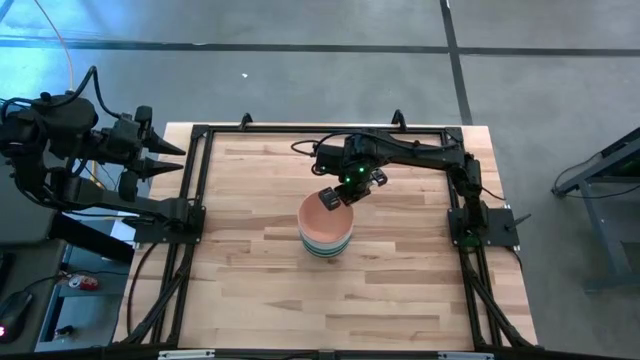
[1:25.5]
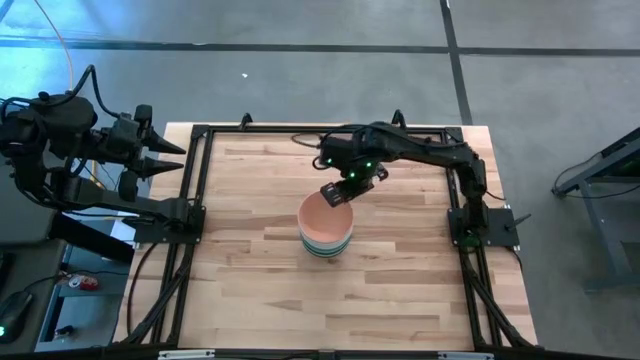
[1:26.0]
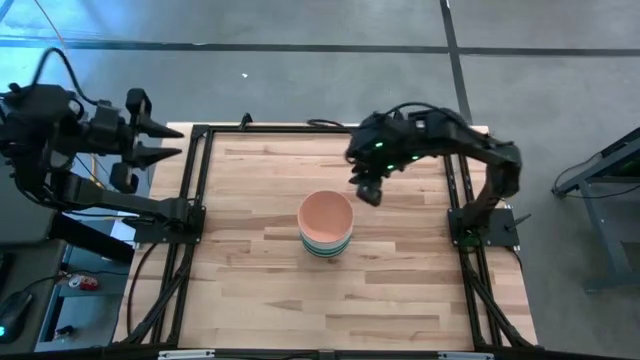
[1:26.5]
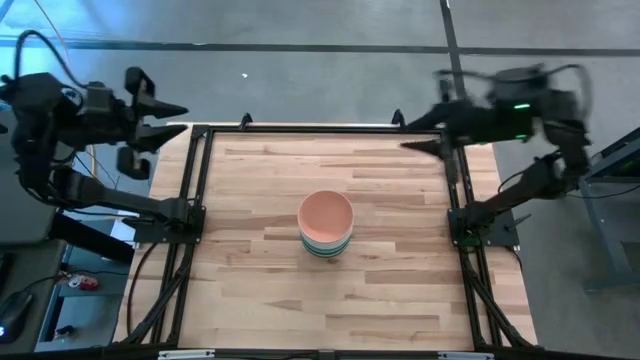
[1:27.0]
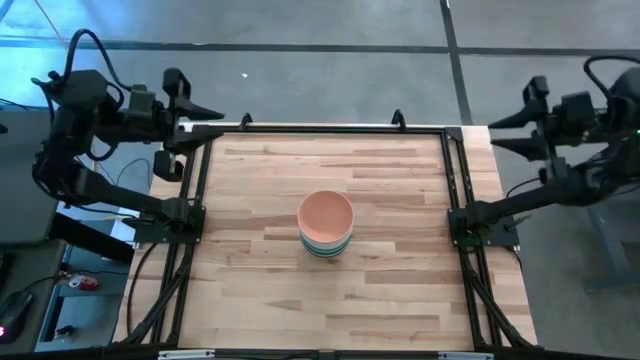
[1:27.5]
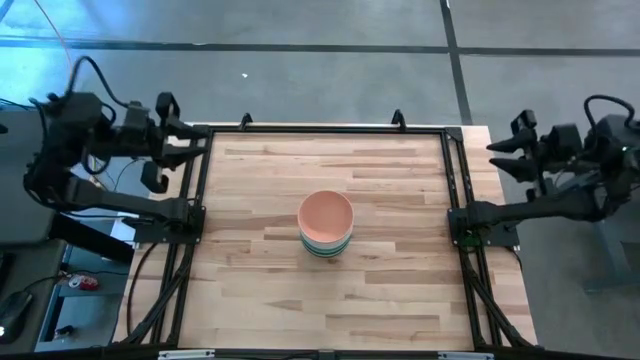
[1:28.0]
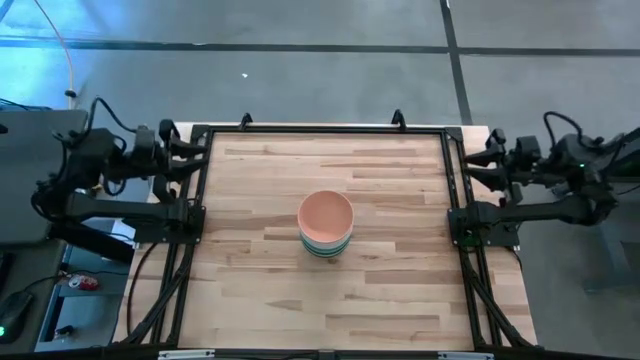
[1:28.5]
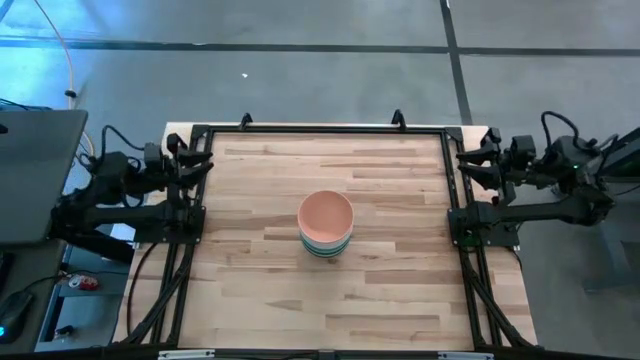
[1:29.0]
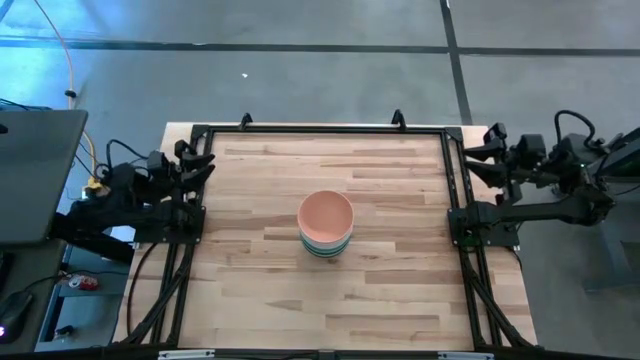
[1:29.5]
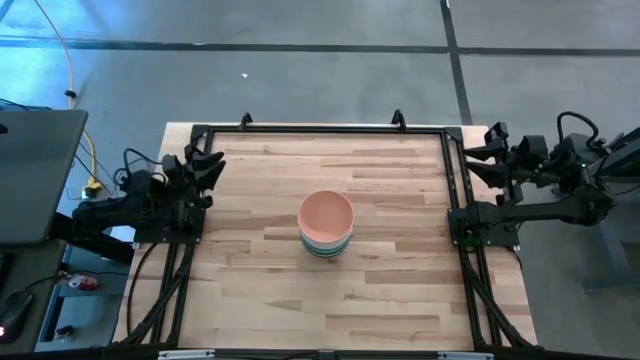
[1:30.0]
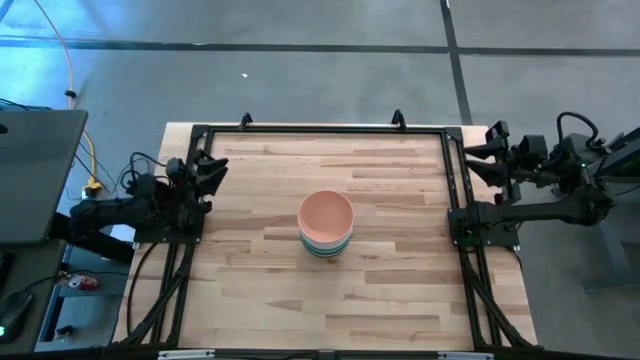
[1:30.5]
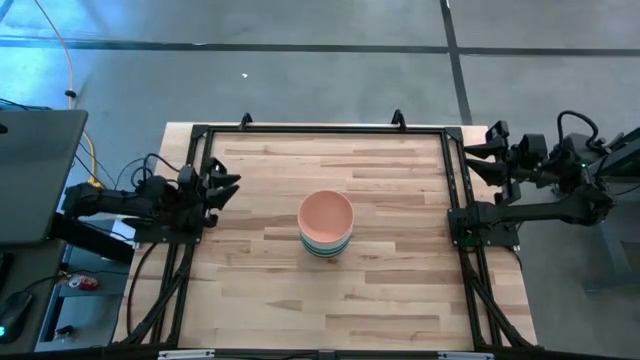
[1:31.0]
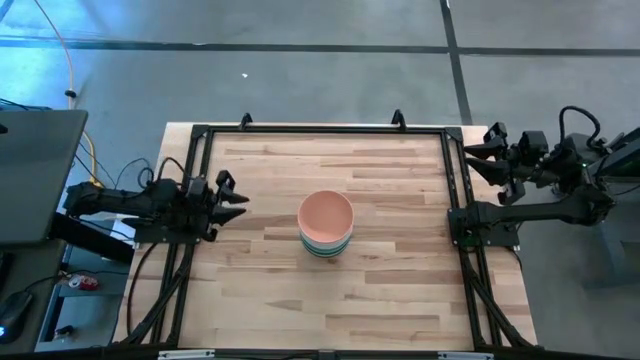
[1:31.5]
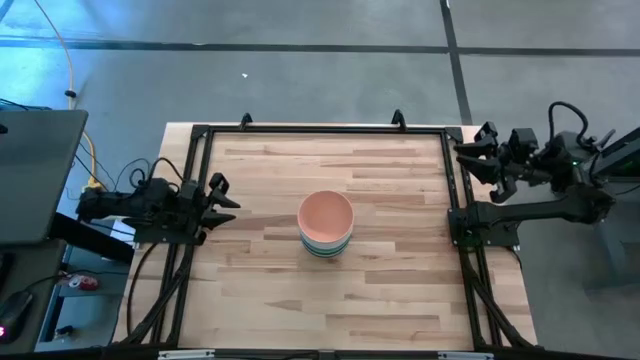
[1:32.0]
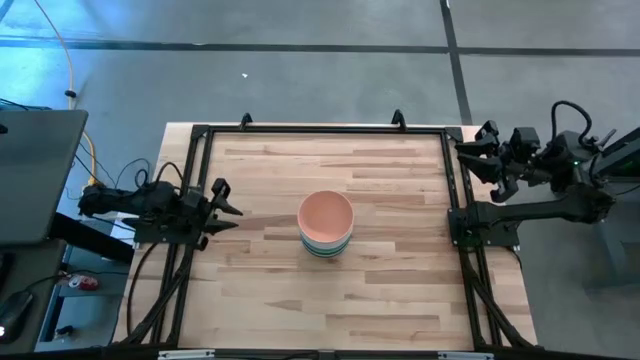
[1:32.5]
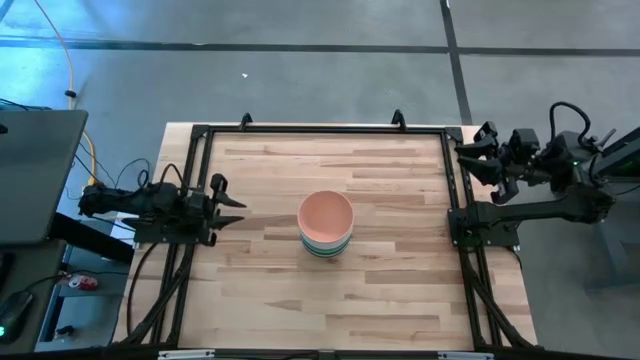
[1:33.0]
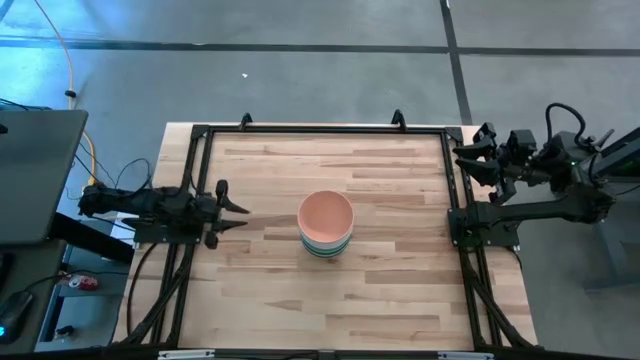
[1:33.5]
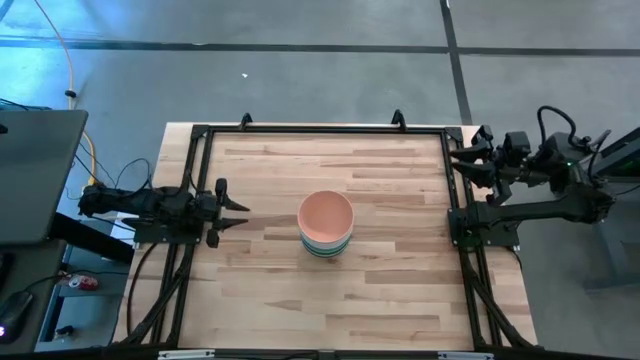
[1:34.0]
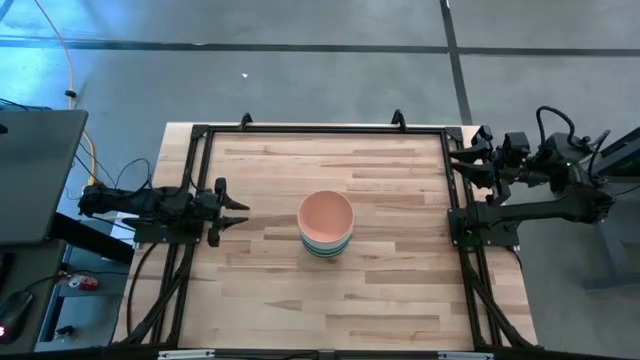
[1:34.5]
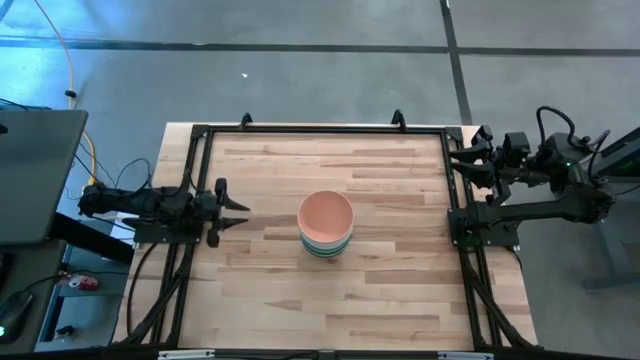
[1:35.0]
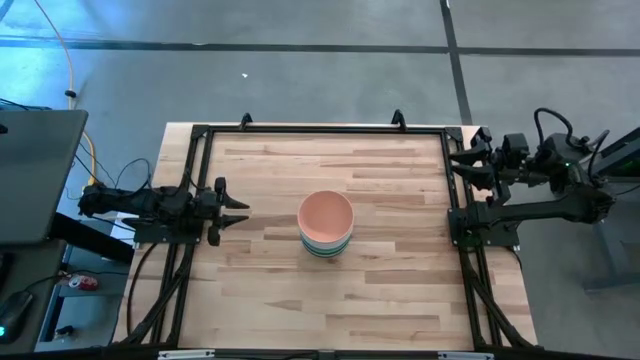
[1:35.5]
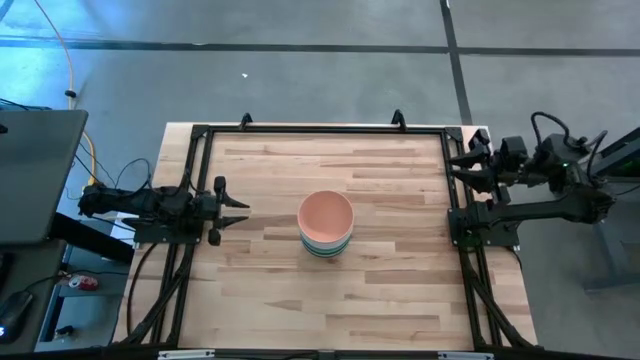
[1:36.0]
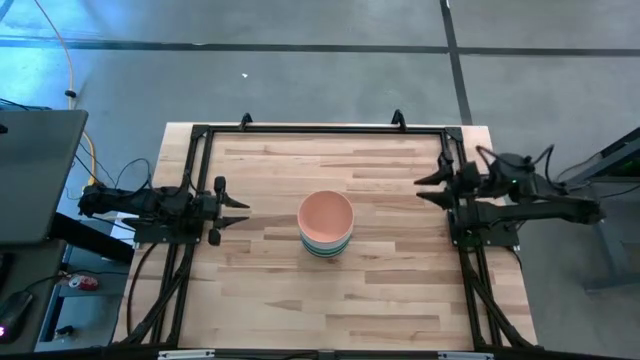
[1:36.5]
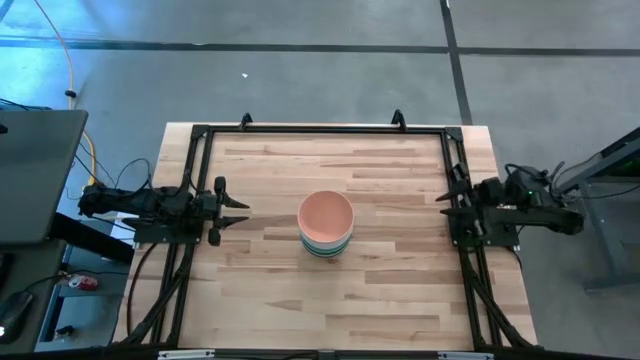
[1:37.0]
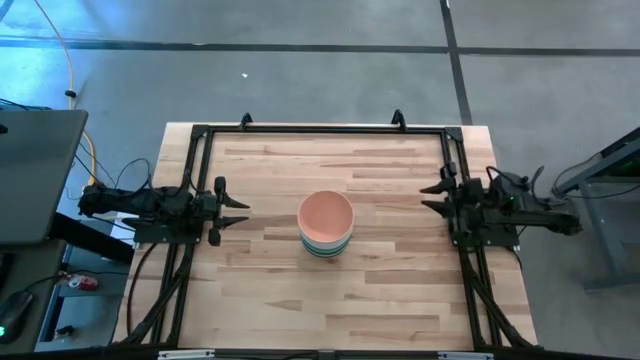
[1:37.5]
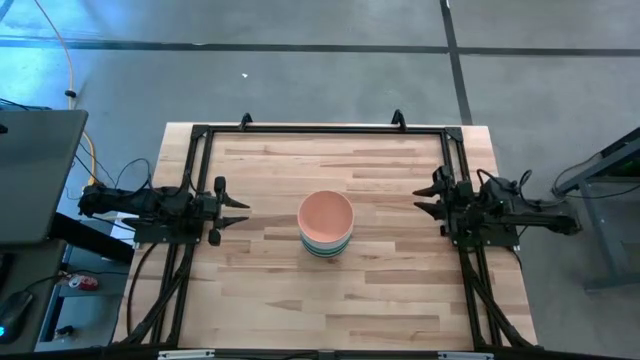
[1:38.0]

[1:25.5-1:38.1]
Task: Nest bowls inside each other
Return to Home Position

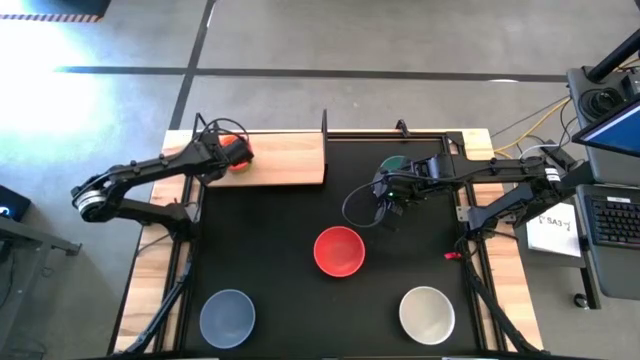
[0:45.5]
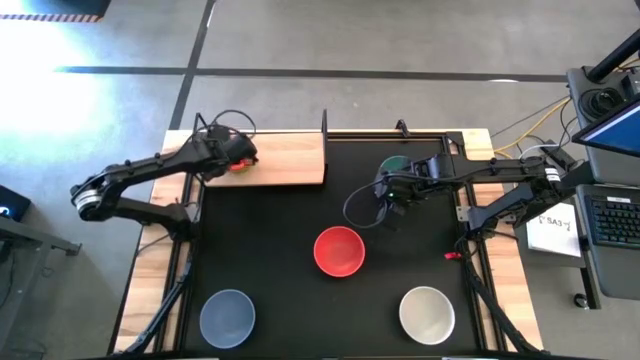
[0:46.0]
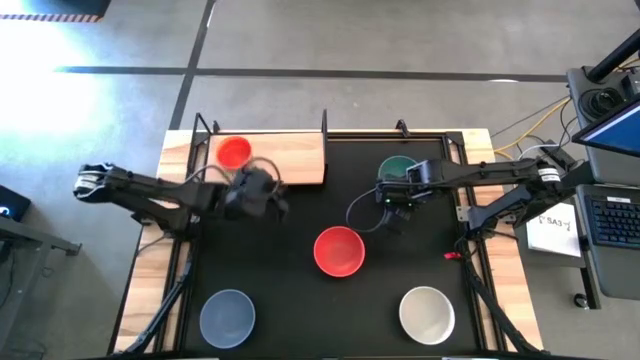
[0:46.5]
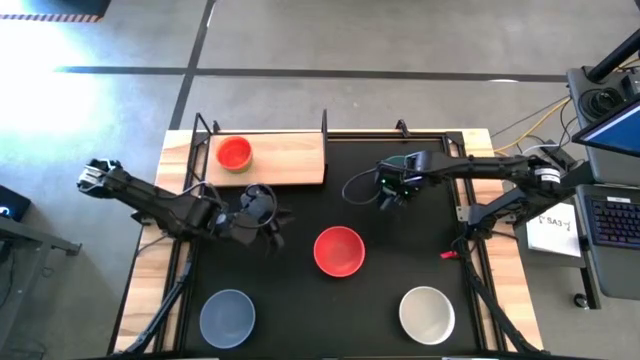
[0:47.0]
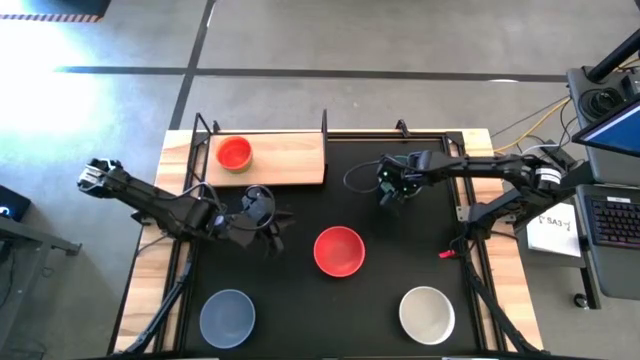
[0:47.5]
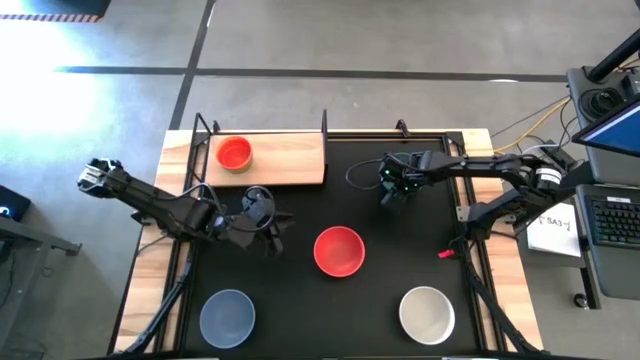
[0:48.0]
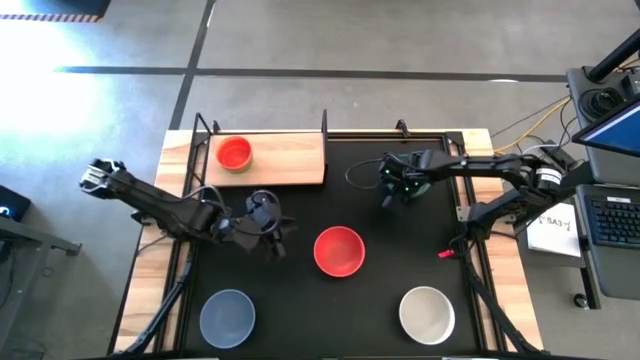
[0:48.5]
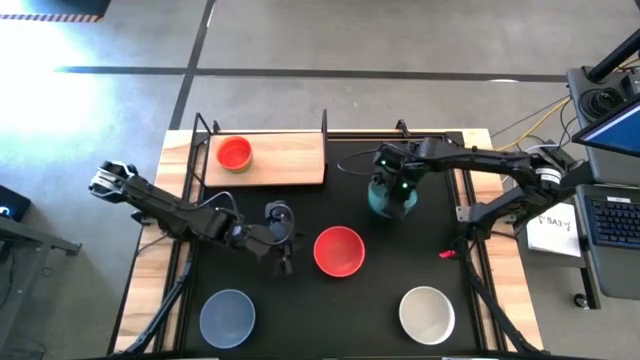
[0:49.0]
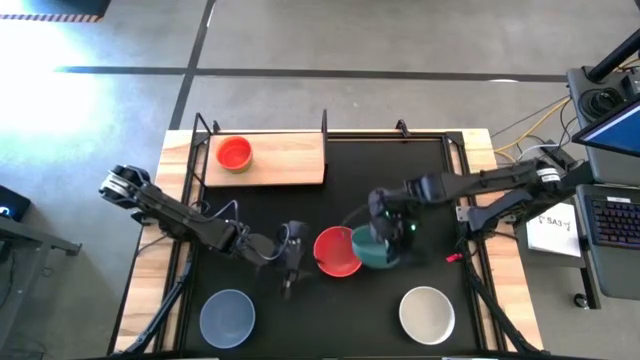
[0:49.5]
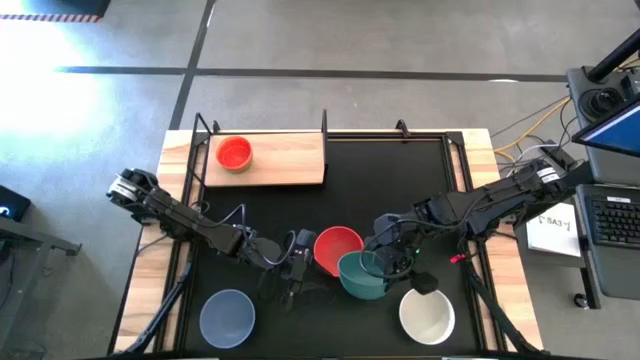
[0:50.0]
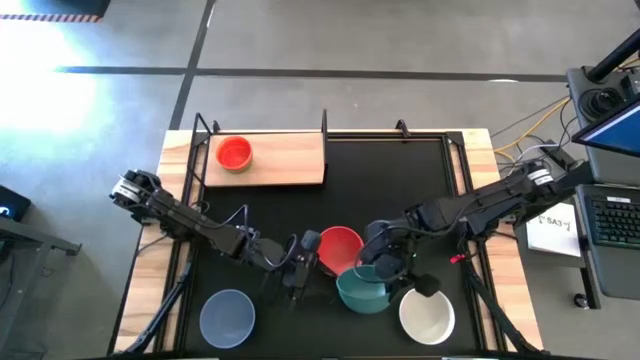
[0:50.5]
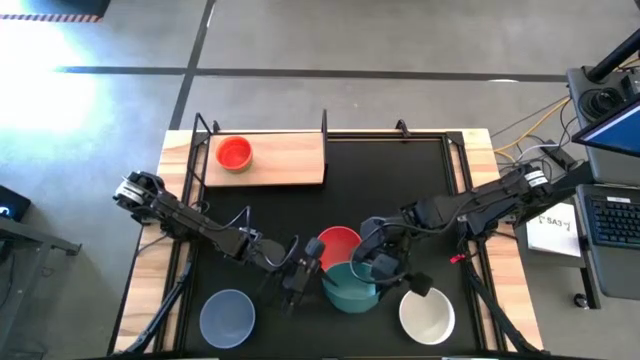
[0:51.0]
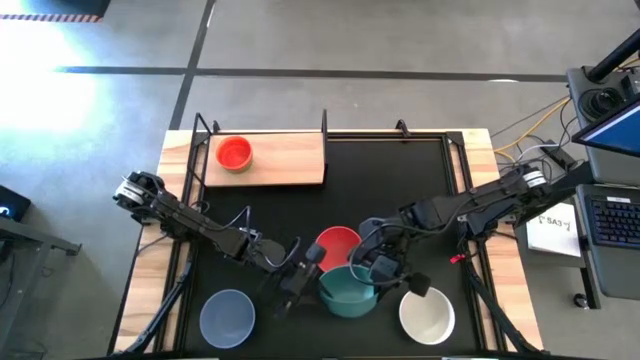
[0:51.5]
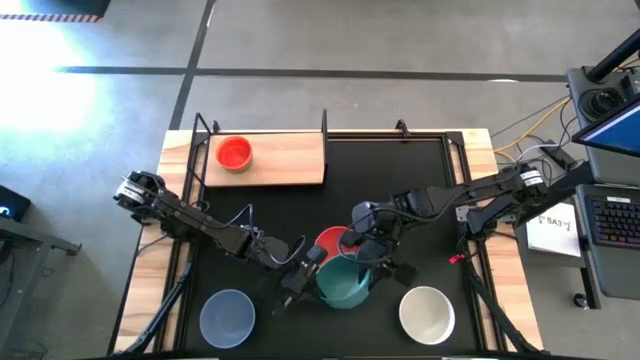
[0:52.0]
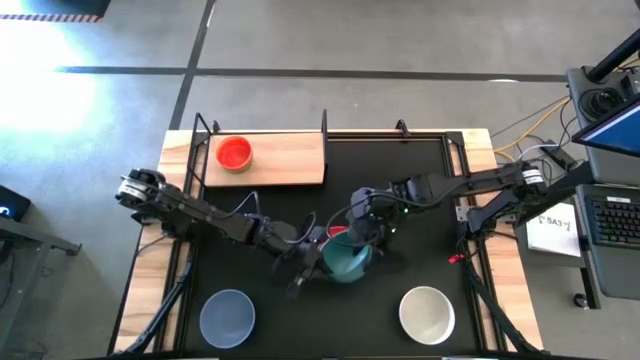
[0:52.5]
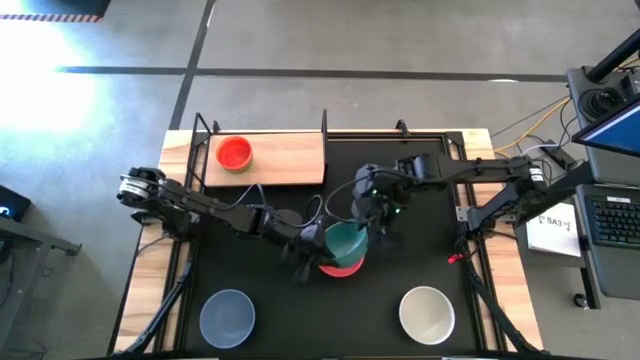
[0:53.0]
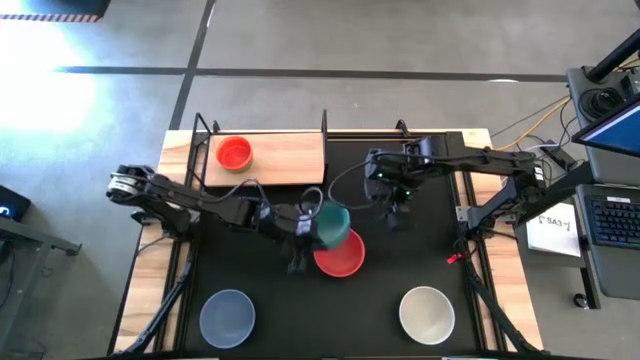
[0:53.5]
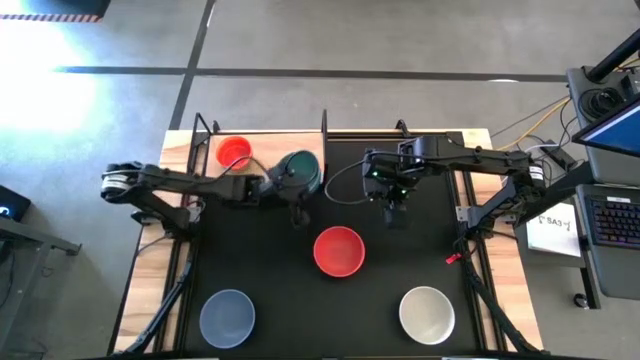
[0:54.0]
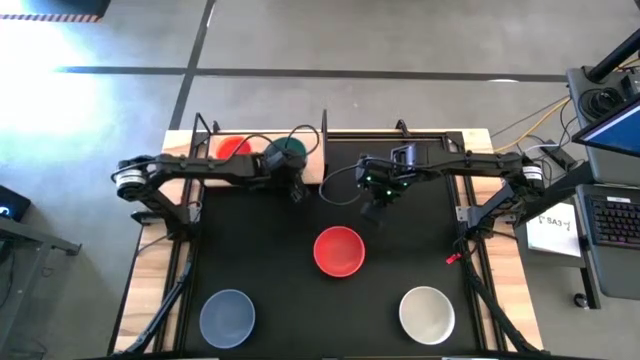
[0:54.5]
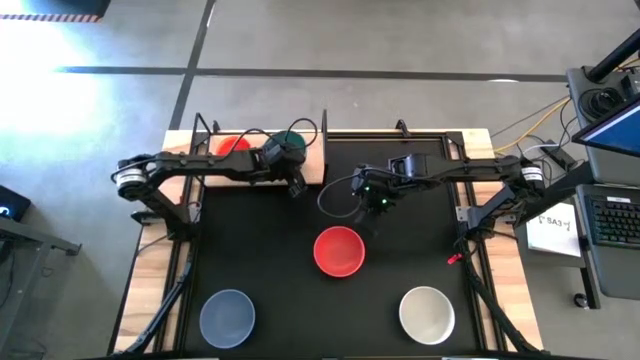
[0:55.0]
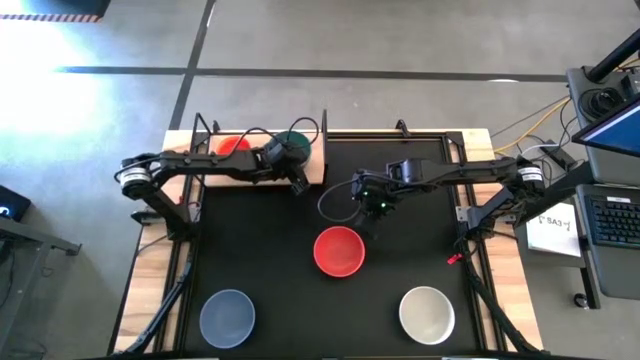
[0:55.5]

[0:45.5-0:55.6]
Task: Place and stack bowls onto a shelf
Put the large green bowl onto the shelf
